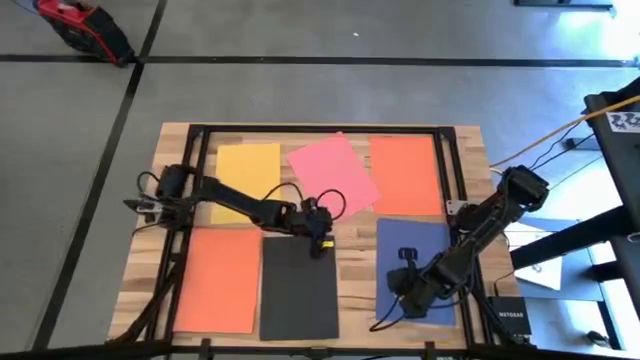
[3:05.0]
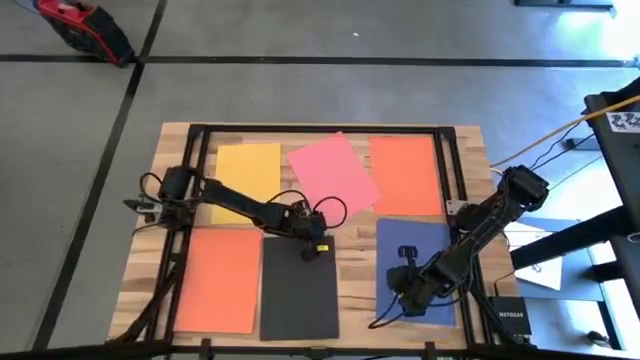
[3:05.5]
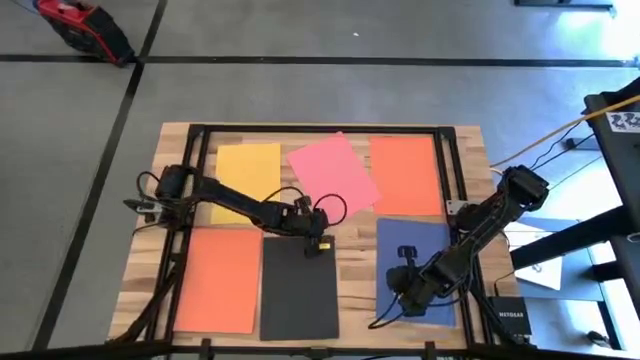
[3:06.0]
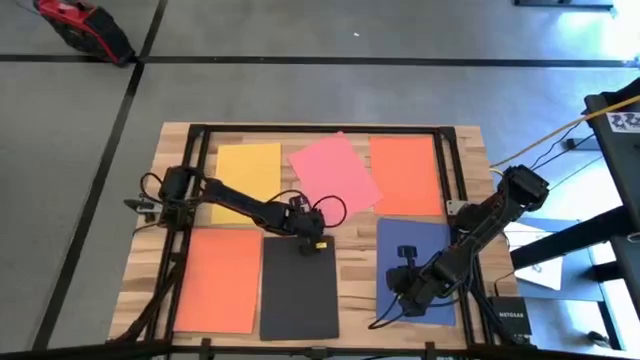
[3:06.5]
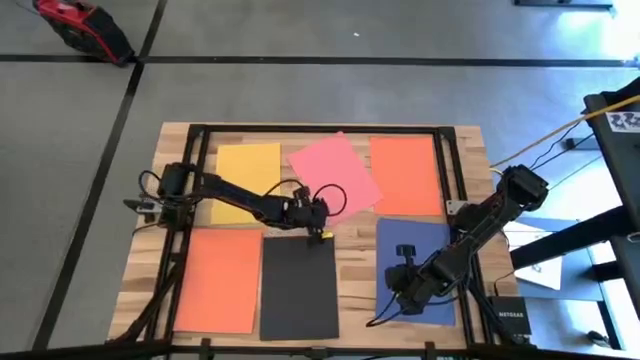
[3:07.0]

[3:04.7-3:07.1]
Task: Organize paper
Adjust the pink paper on the table

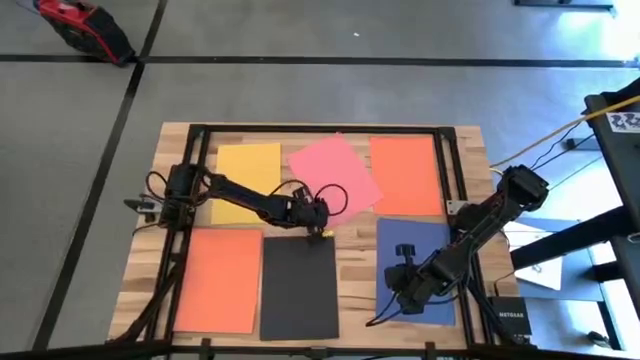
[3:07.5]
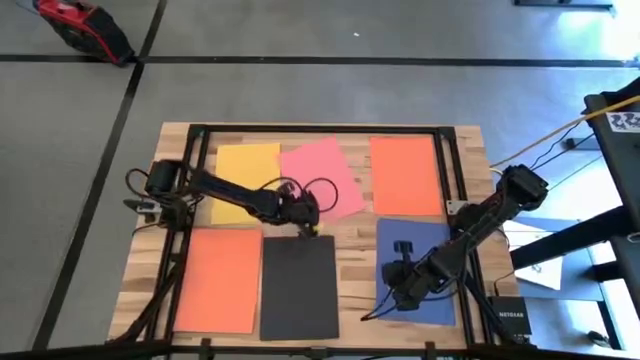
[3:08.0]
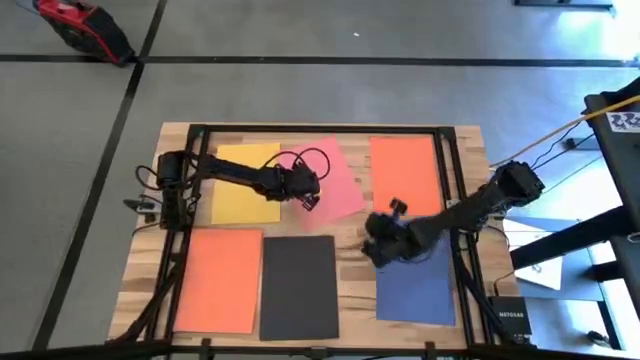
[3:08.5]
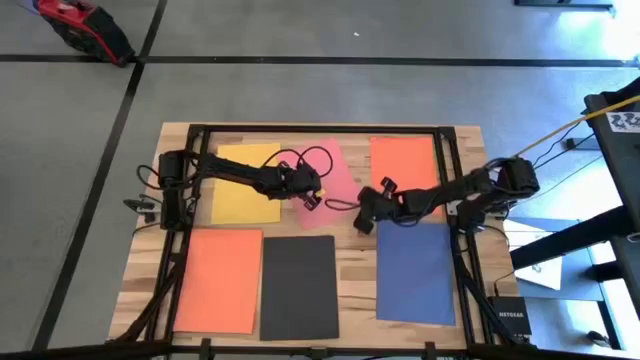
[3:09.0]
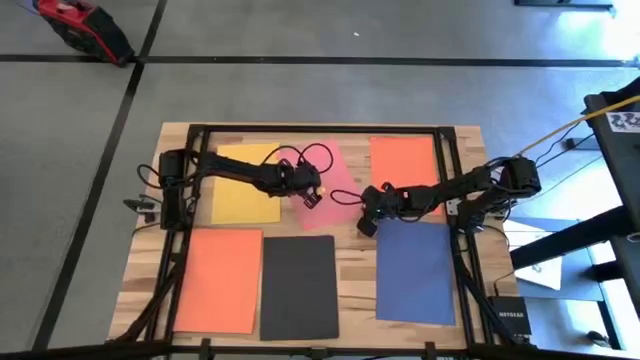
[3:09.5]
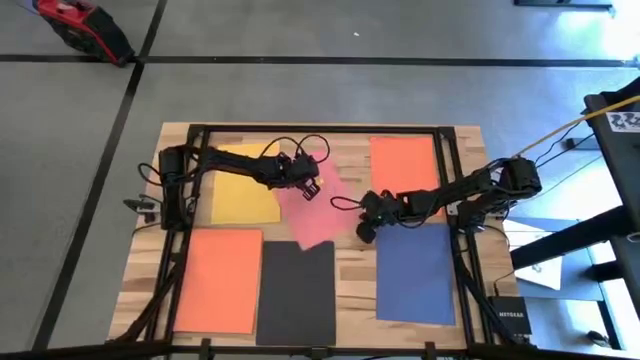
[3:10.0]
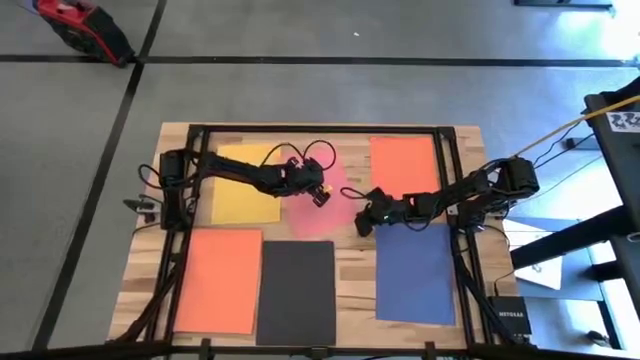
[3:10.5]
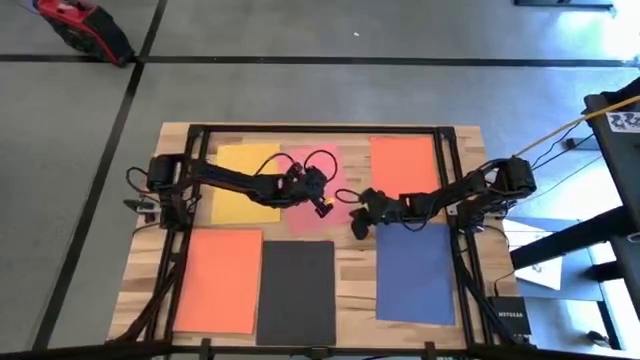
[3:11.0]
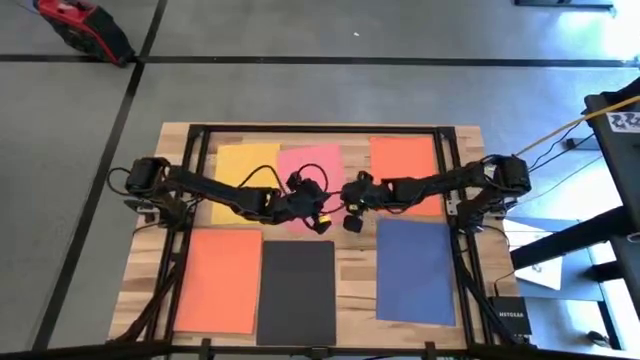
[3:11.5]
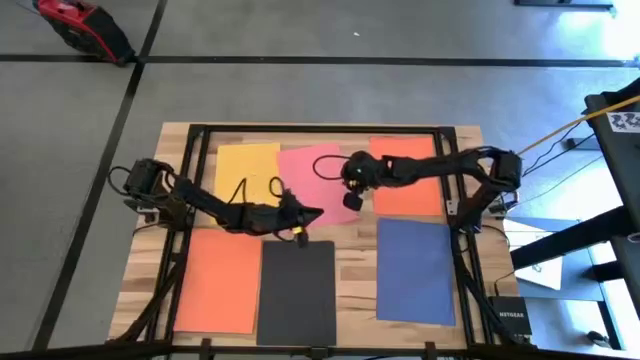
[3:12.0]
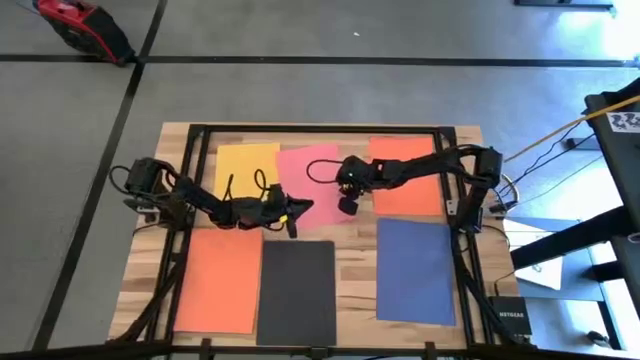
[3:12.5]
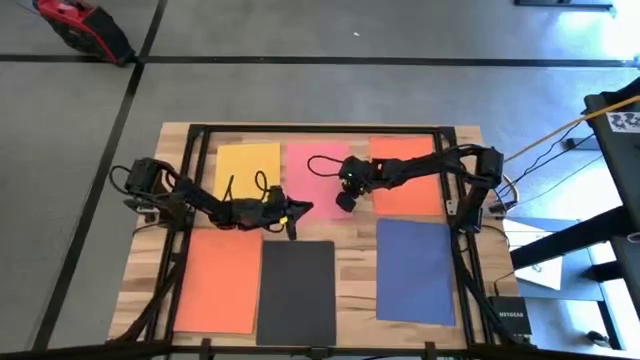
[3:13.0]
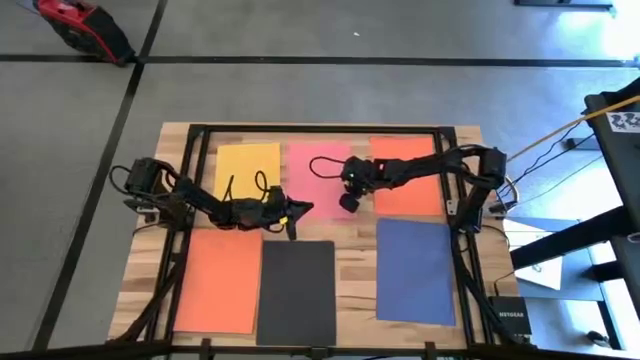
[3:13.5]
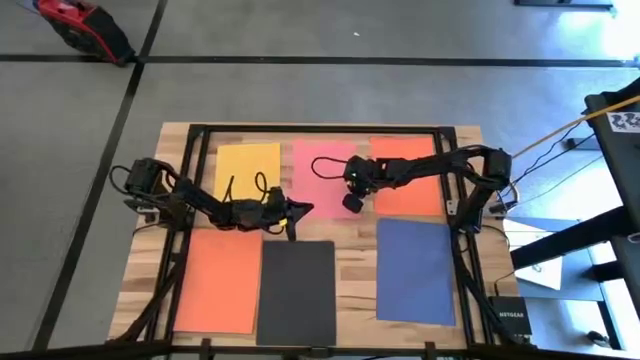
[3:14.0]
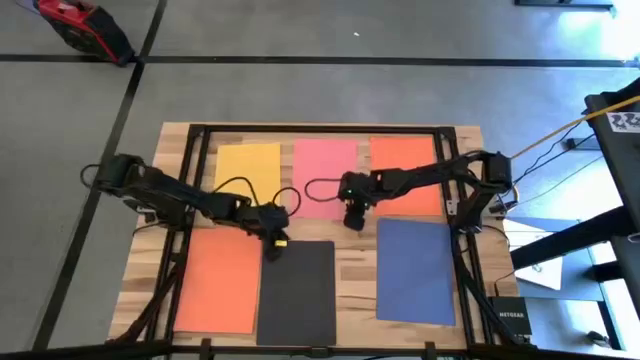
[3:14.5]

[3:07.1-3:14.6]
Adjust the pink paper on the table

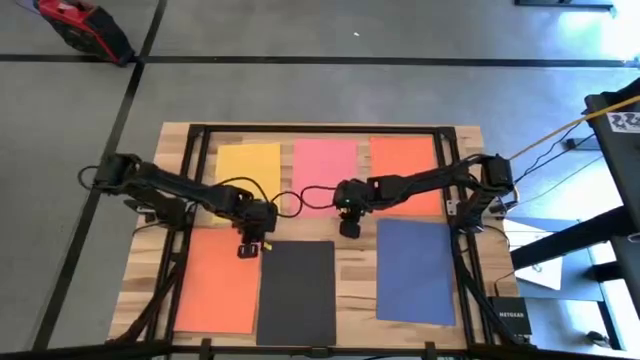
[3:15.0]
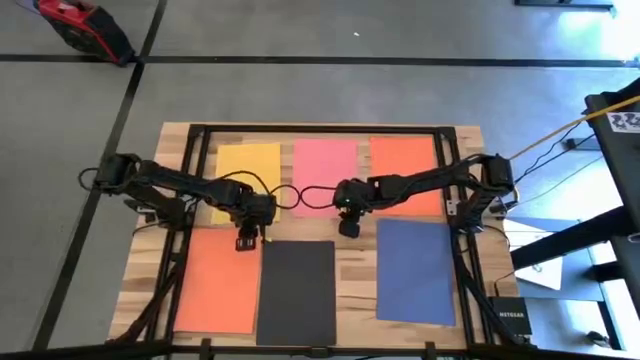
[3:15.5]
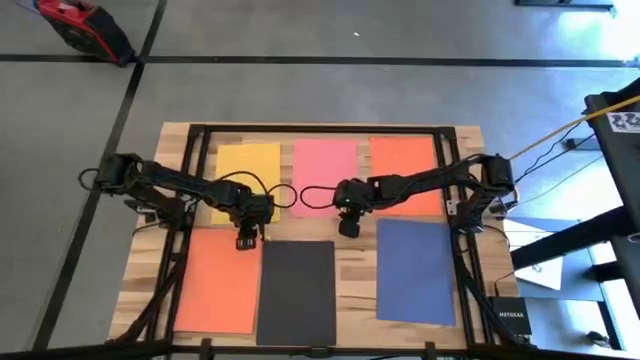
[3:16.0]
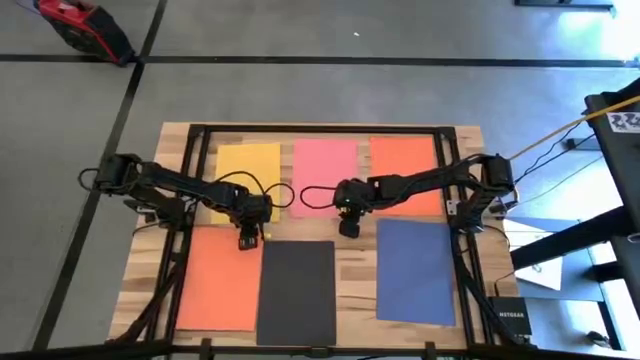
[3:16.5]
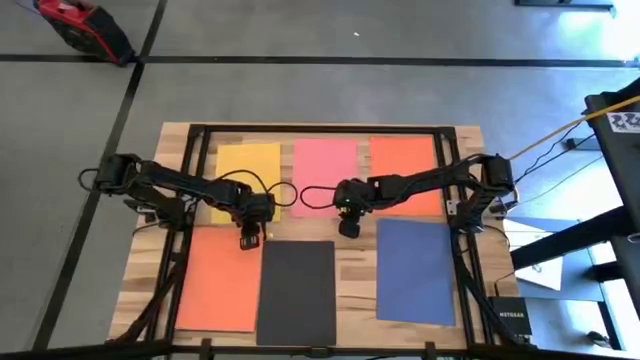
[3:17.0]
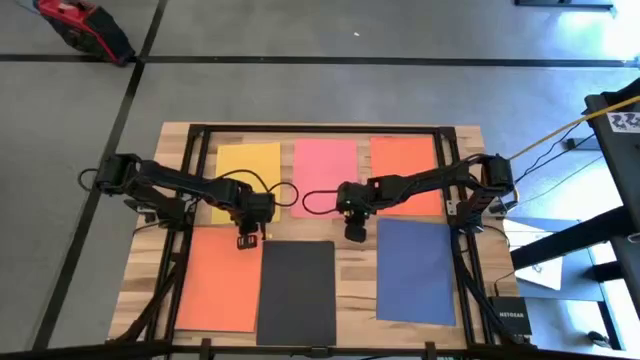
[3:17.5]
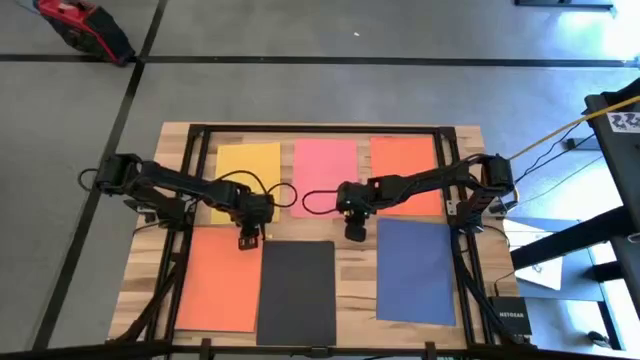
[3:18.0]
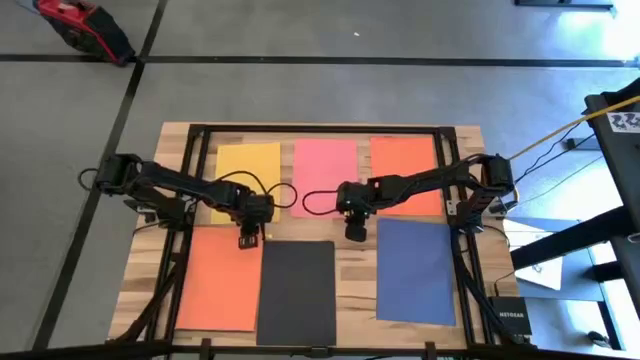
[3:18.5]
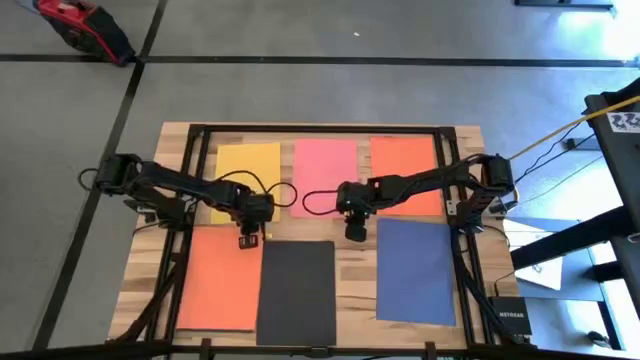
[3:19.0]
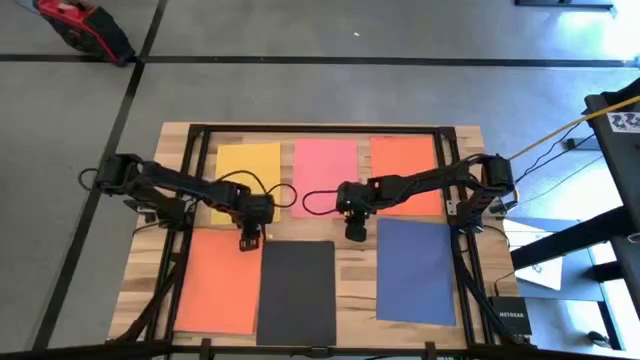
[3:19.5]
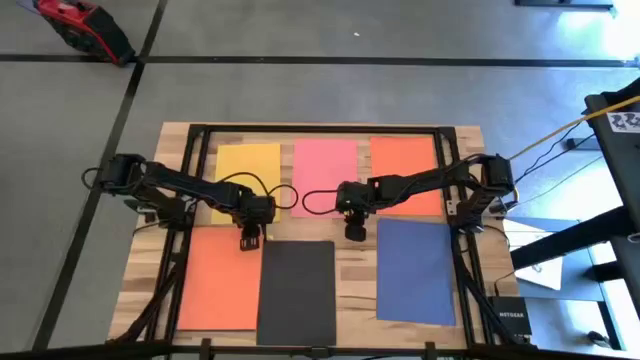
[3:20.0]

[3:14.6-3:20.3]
Stack the orange paper on the top of the orange paper

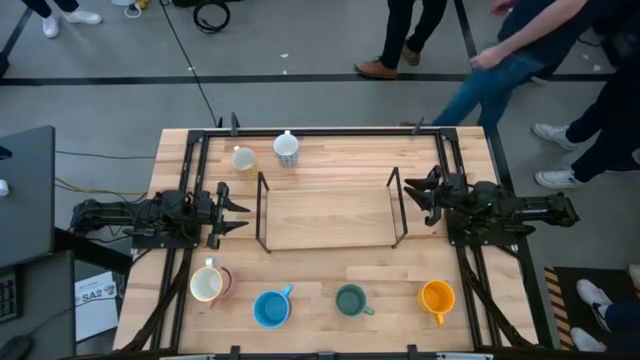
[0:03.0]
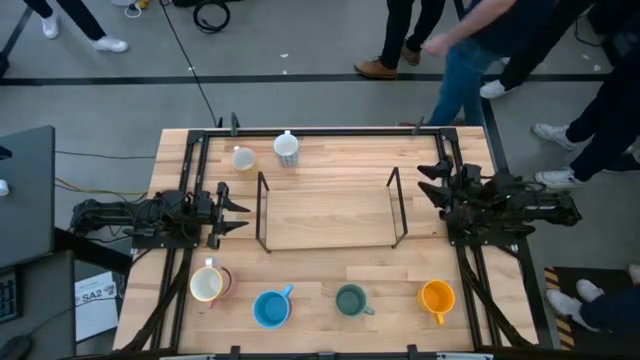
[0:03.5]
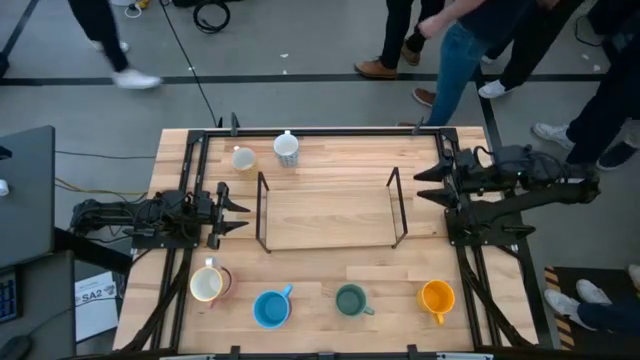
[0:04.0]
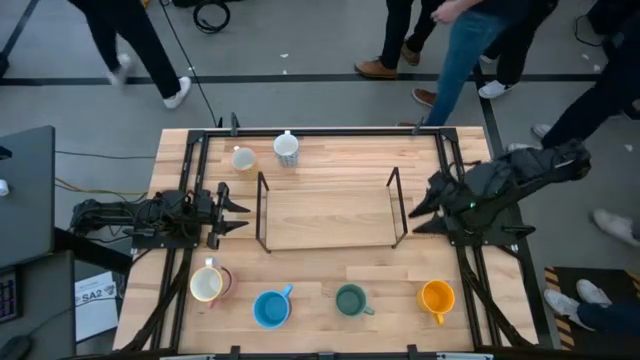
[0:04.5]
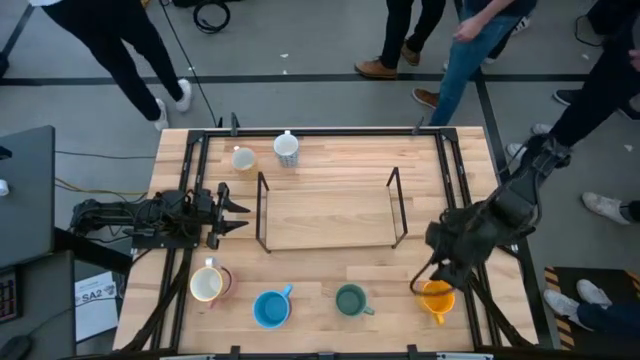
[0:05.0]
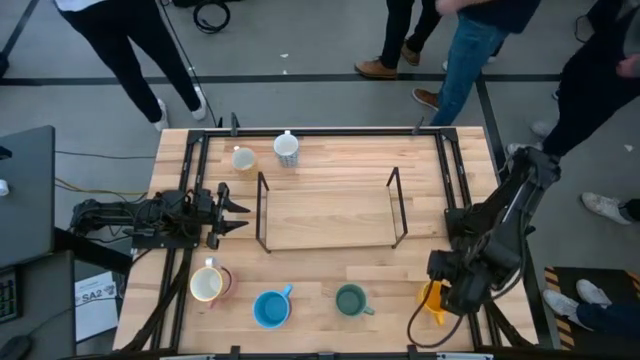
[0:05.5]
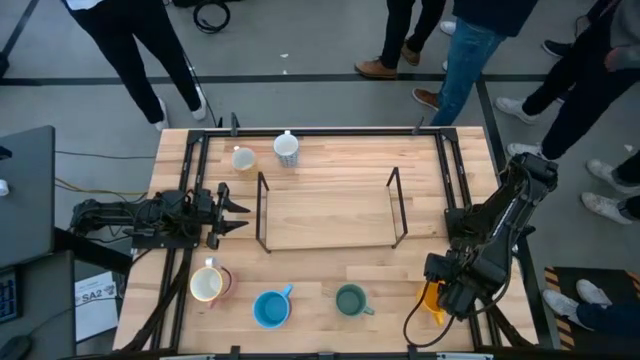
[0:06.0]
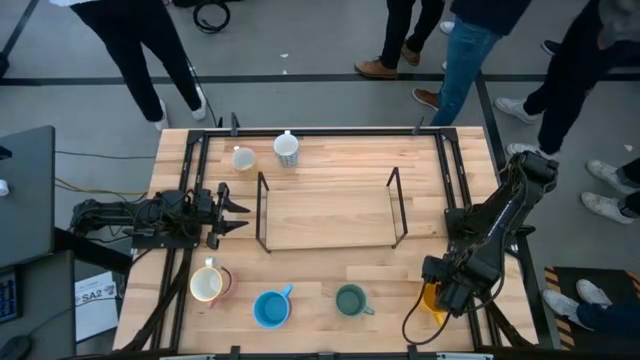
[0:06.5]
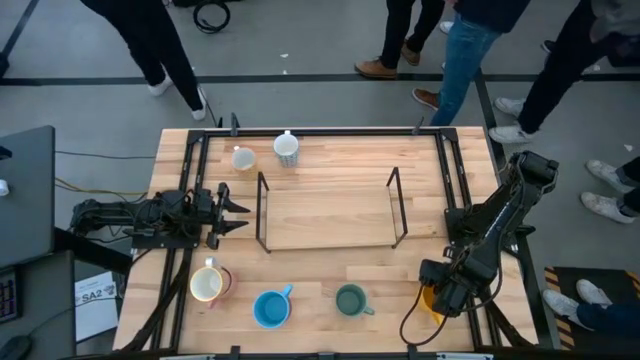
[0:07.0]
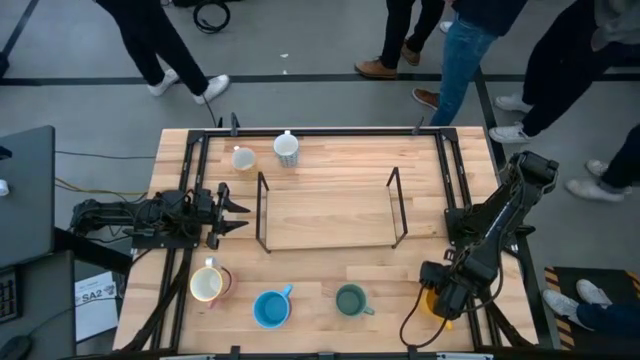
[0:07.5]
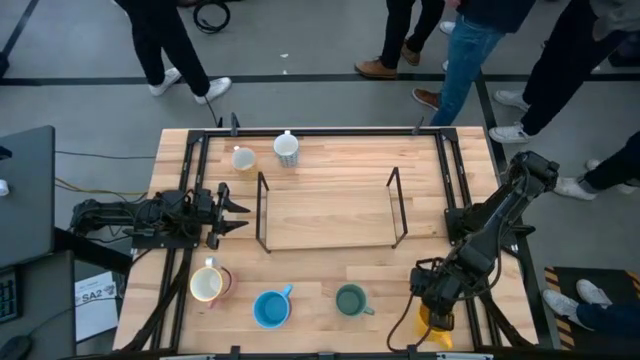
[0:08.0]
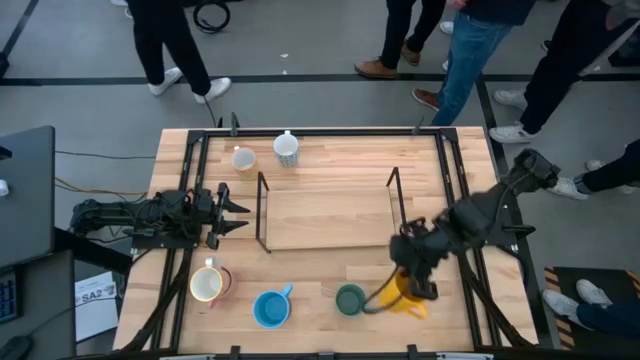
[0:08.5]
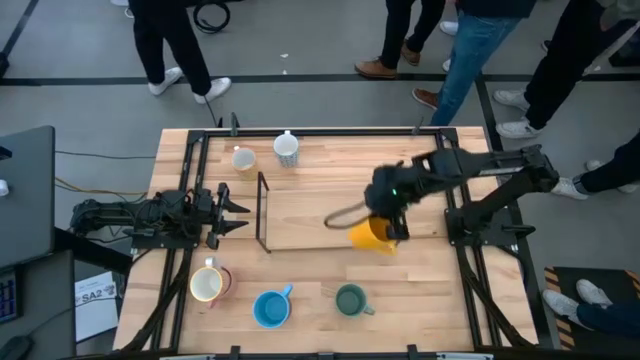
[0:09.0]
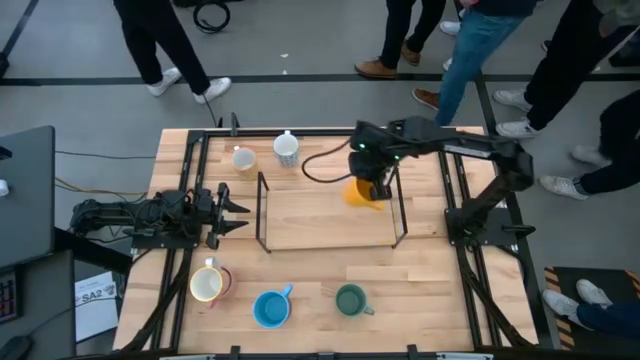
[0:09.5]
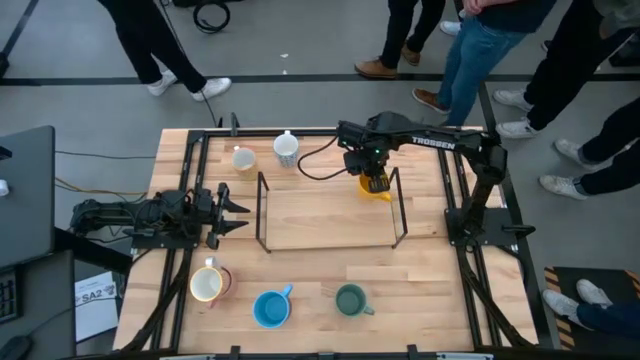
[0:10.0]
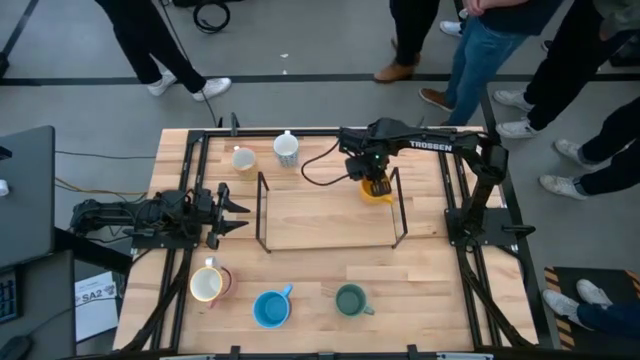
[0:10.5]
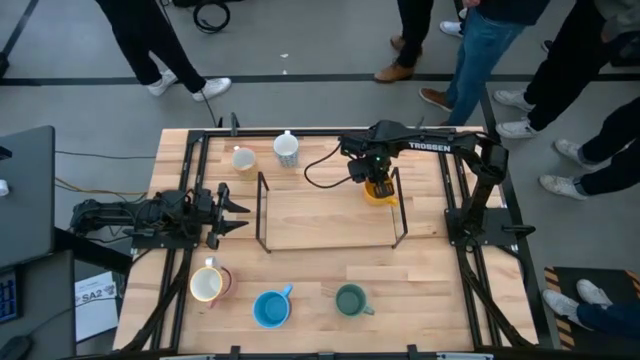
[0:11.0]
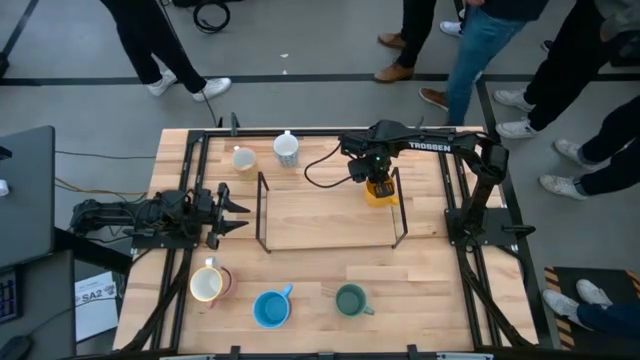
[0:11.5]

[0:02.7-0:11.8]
Task: Place coffee mugs
Put the yellow mug on the shelf
